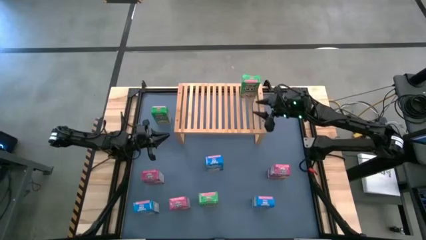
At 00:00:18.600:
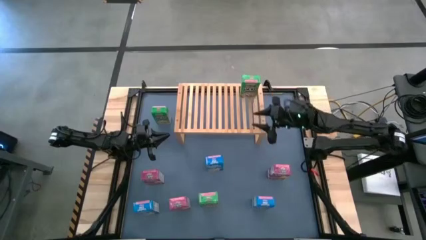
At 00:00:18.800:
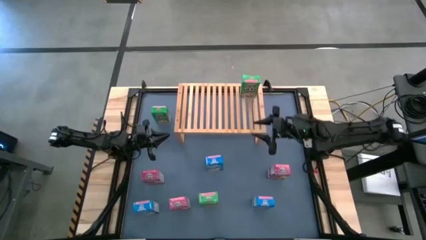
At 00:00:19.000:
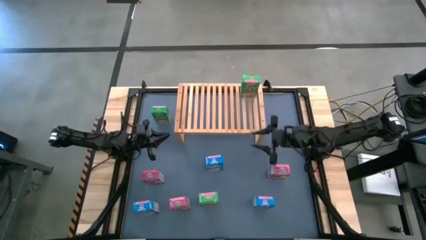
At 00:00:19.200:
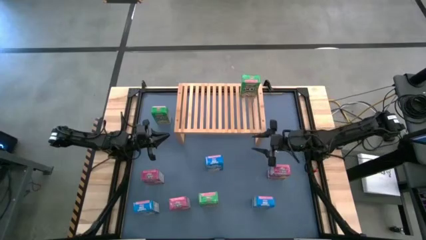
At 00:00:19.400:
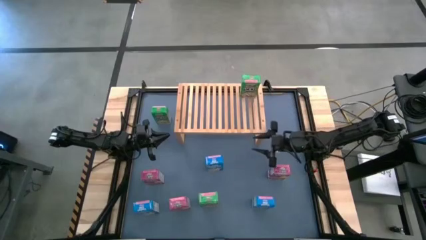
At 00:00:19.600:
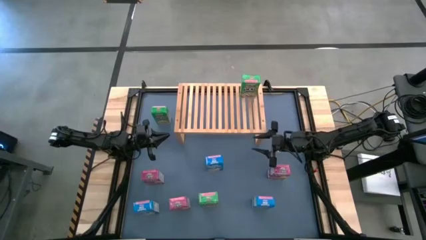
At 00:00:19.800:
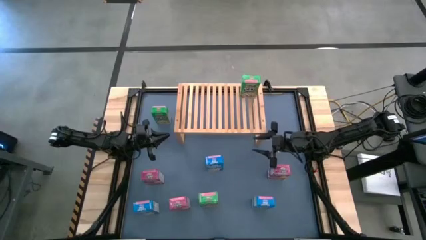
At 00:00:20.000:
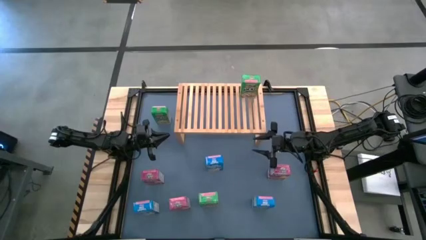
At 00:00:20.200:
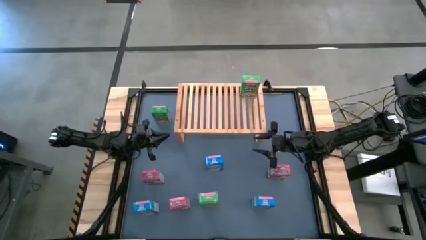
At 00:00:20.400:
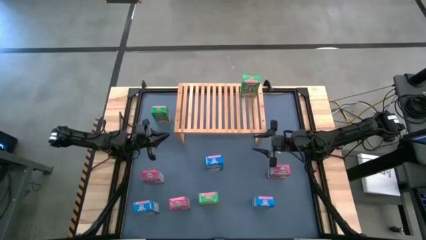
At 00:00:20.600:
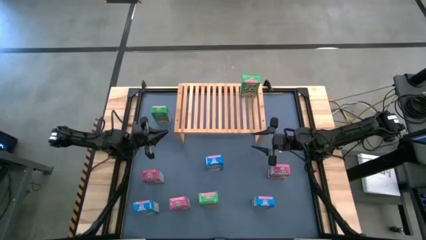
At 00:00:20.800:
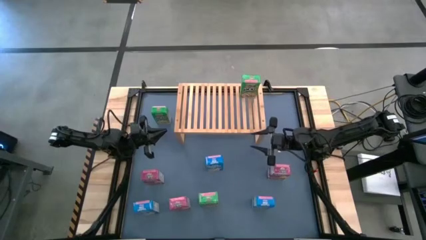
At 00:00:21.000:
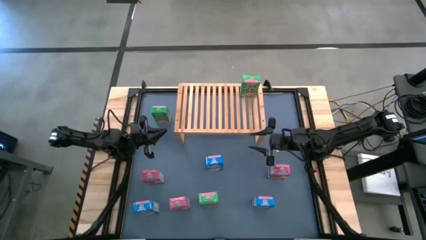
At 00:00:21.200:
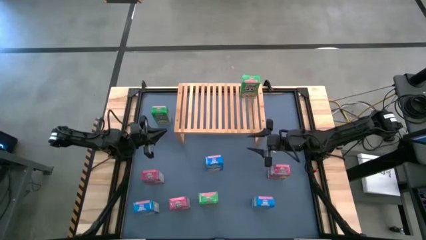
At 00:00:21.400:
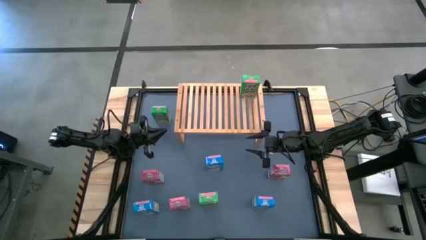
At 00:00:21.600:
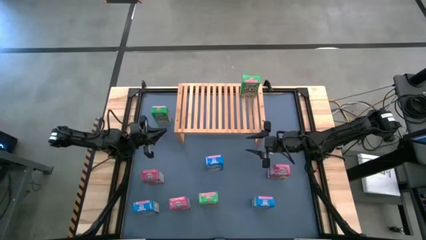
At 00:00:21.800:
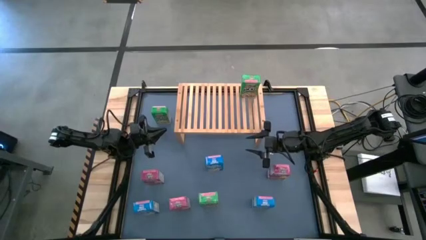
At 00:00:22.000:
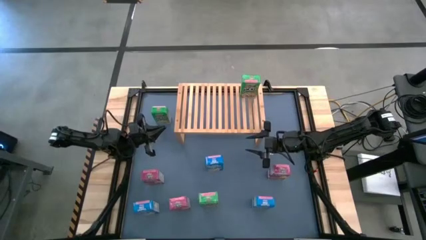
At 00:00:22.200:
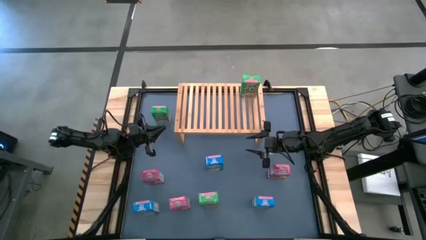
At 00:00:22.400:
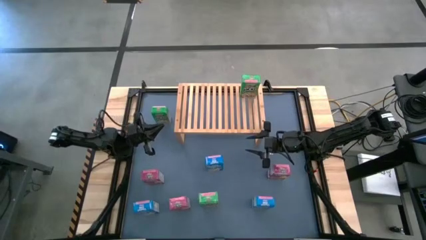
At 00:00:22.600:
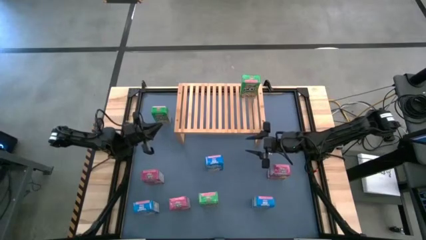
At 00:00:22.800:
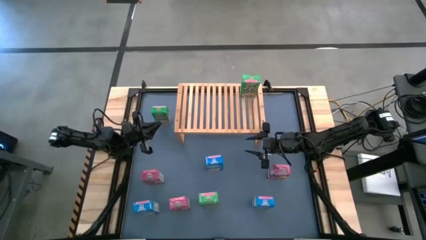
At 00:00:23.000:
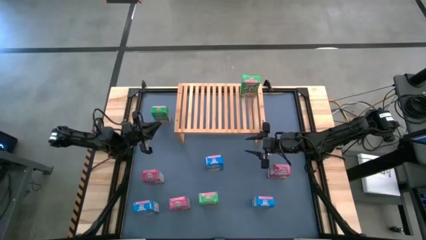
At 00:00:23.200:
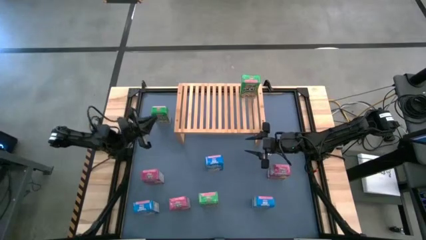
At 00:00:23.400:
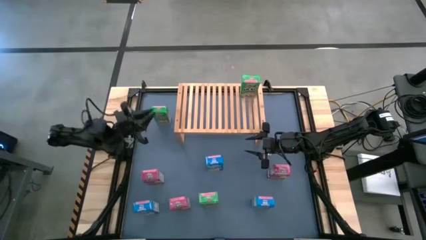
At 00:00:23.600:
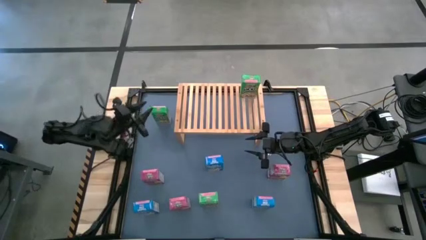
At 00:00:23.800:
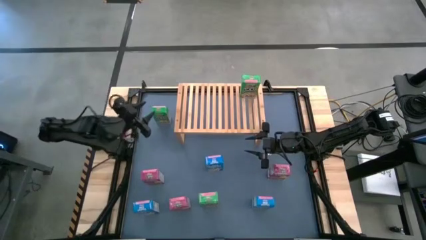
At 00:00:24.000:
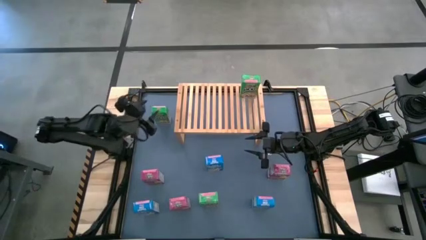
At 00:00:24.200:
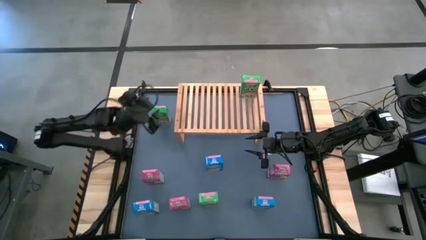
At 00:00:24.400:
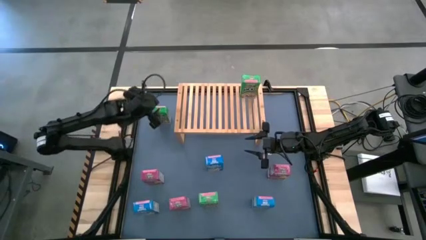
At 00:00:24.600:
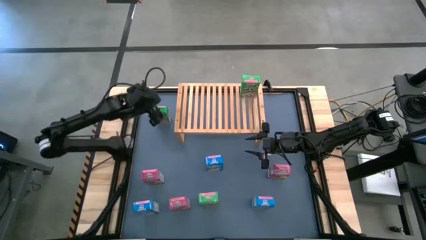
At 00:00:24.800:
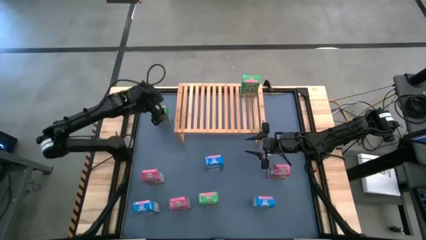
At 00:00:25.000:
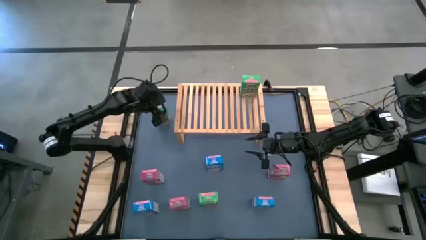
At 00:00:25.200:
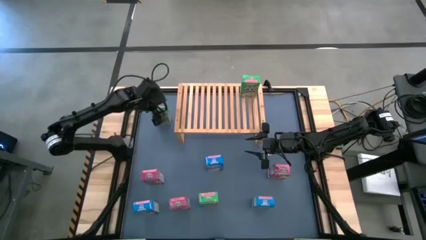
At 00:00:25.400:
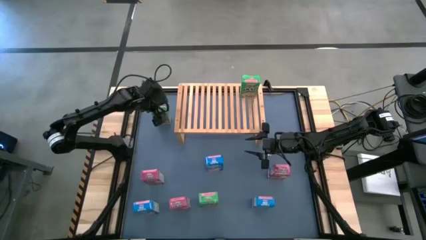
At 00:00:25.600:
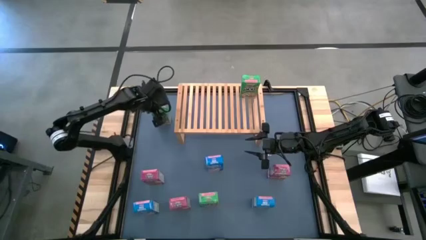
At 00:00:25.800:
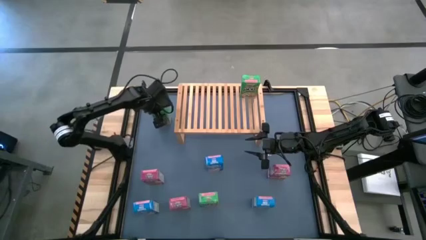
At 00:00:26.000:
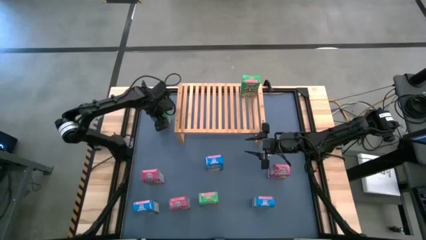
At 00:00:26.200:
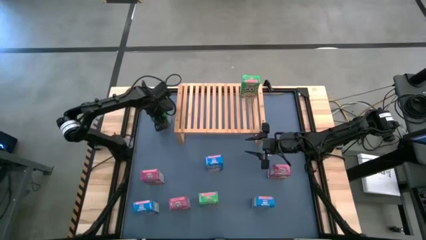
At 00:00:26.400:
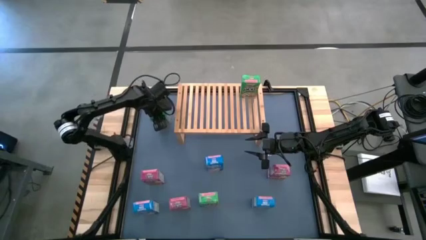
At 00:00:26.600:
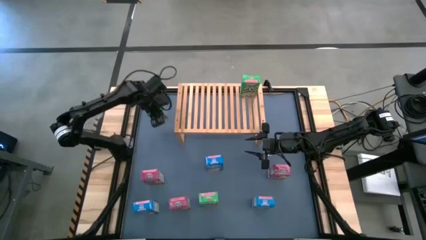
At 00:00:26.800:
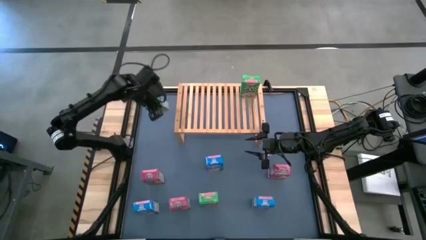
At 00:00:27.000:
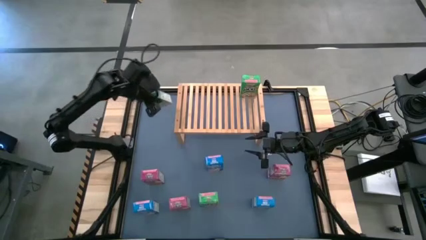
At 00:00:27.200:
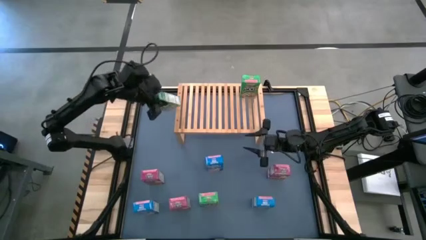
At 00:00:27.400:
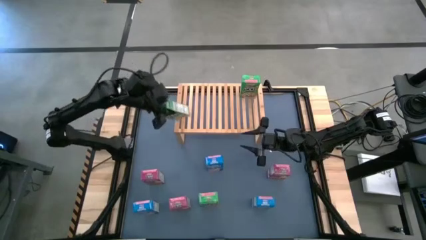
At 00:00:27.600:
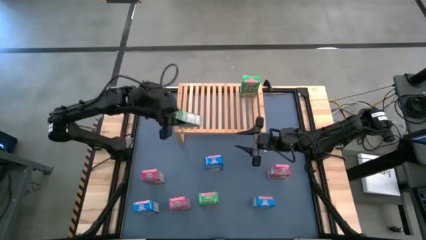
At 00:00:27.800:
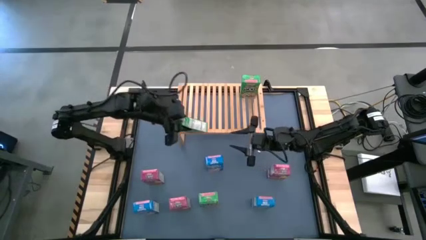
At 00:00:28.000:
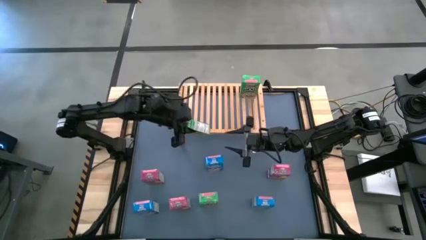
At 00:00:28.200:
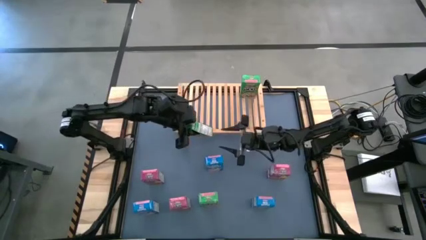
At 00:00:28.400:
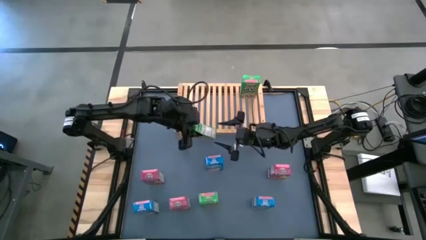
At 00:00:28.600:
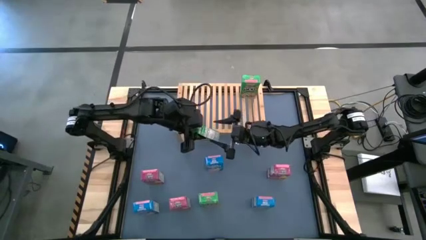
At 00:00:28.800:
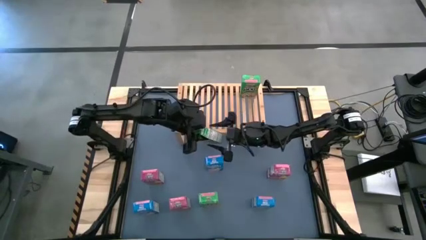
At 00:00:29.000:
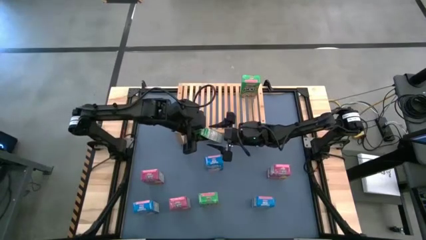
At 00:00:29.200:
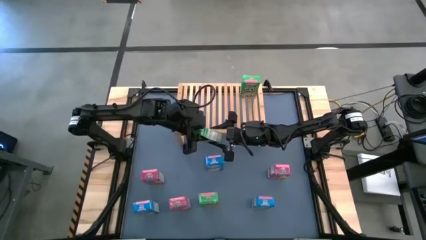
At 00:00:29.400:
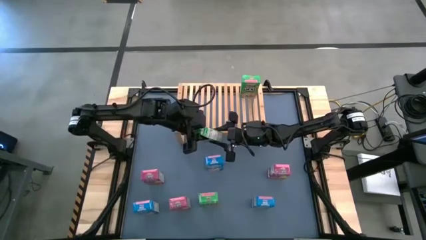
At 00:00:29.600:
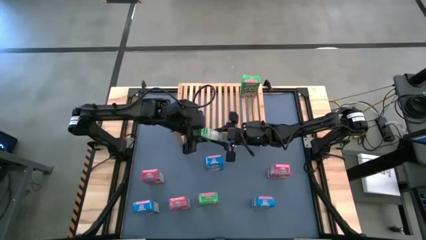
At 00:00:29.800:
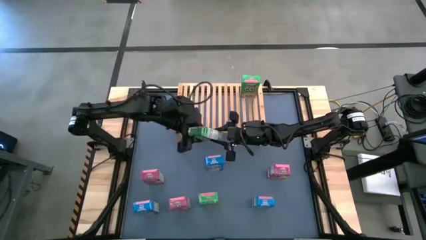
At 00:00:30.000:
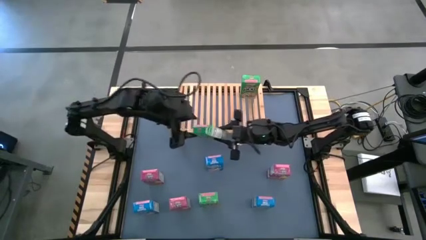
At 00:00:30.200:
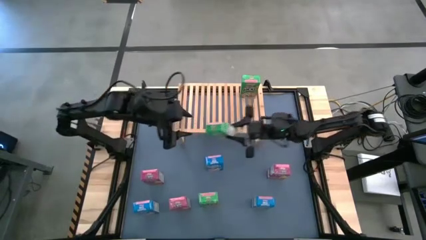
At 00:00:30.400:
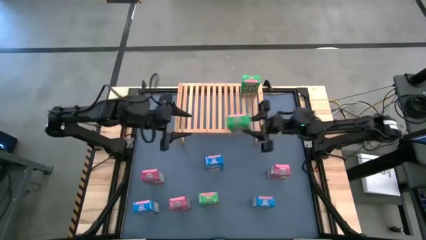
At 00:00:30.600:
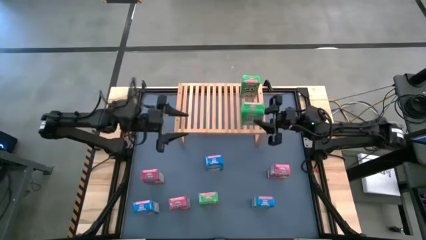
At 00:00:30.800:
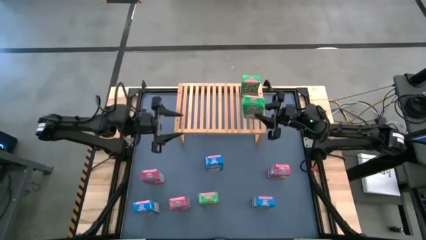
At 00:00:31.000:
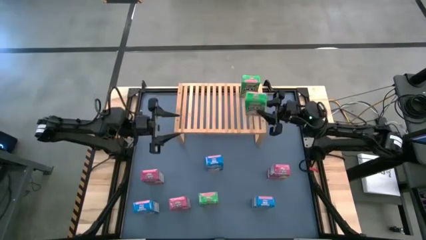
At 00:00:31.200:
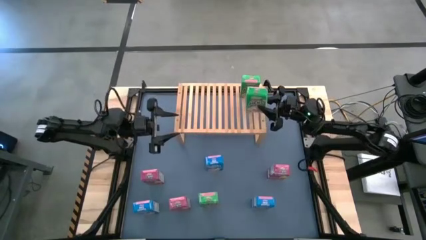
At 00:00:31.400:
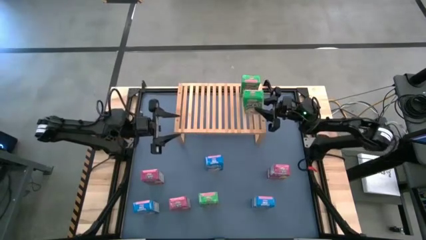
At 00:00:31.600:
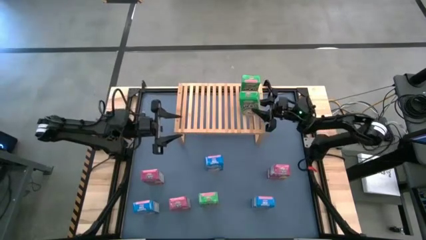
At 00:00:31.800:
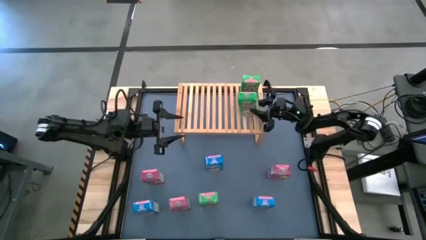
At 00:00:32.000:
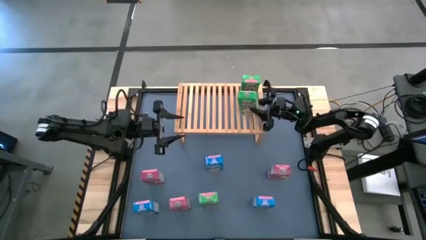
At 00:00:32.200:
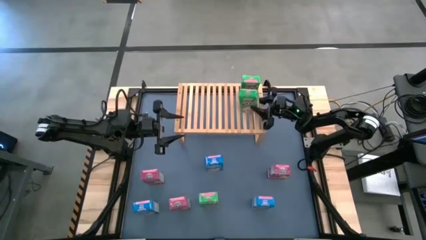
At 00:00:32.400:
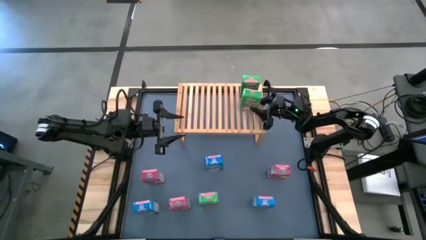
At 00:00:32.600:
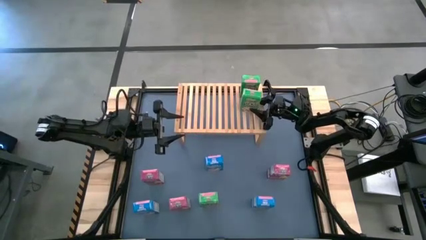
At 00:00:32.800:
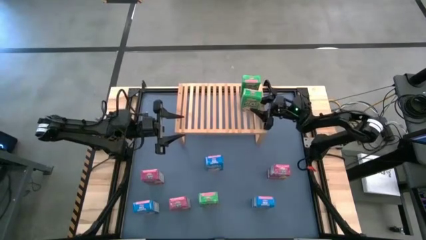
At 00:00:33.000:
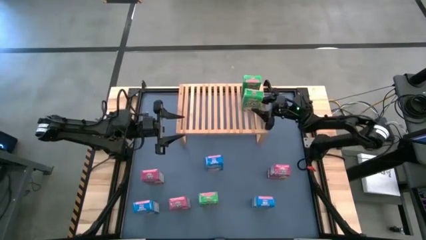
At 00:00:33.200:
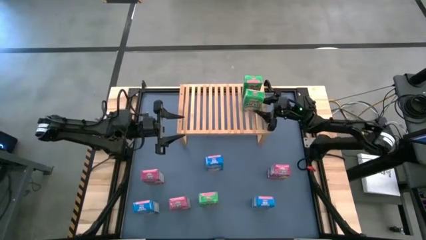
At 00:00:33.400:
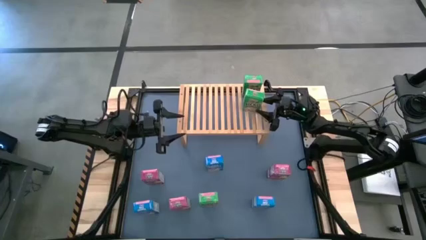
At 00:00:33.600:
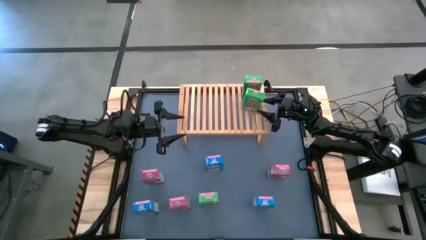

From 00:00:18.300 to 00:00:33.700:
Task: Stack cereal on shelf
Put the top green cereal box on the shelf aligned with the other green cereal box
